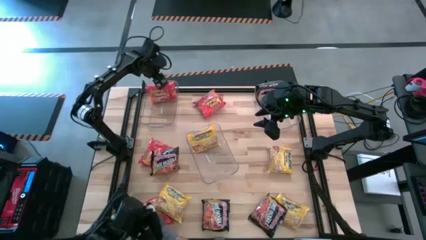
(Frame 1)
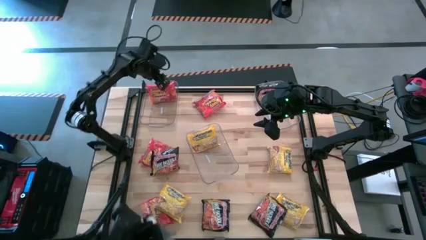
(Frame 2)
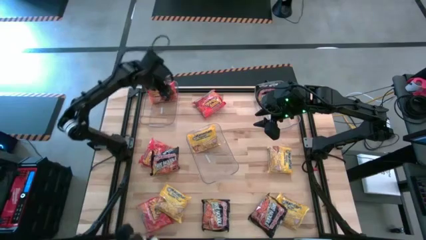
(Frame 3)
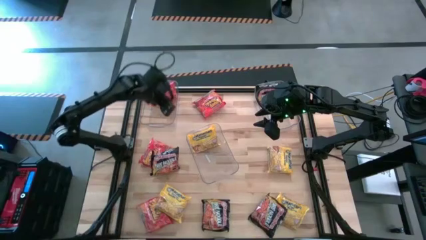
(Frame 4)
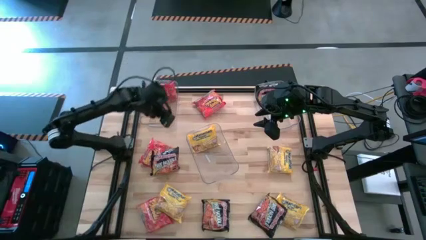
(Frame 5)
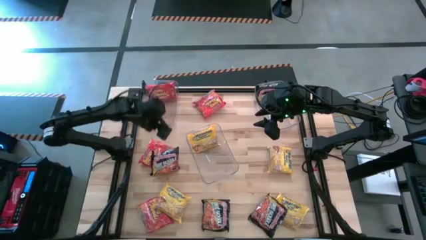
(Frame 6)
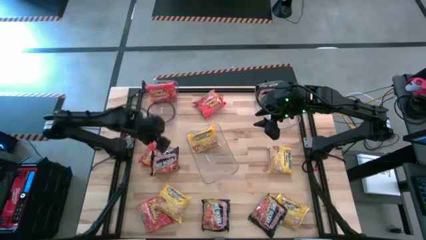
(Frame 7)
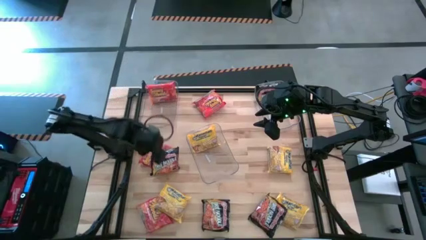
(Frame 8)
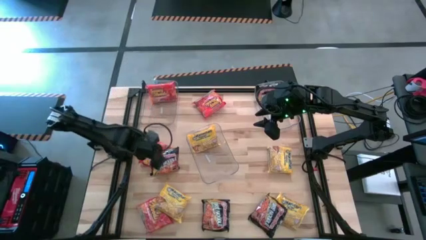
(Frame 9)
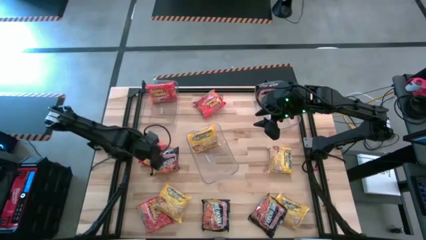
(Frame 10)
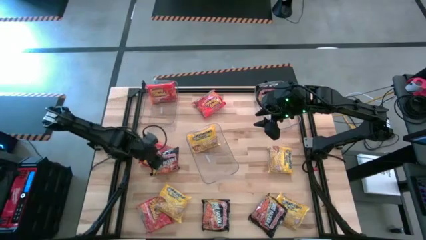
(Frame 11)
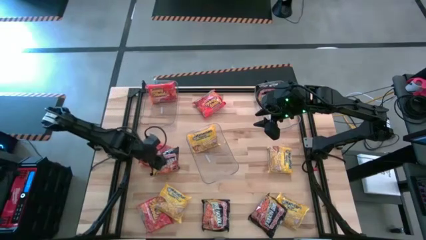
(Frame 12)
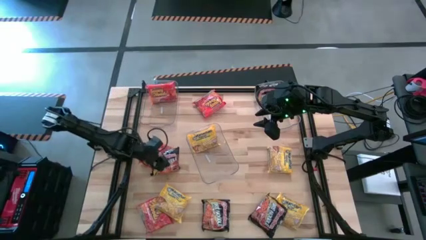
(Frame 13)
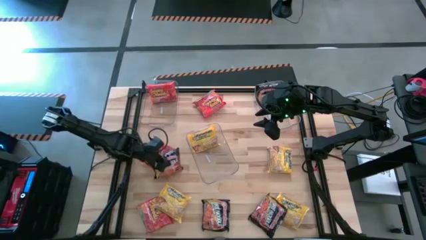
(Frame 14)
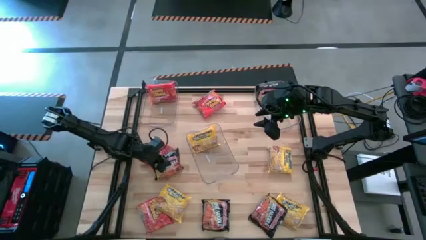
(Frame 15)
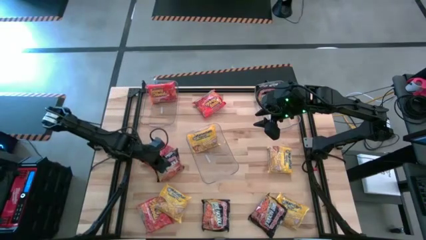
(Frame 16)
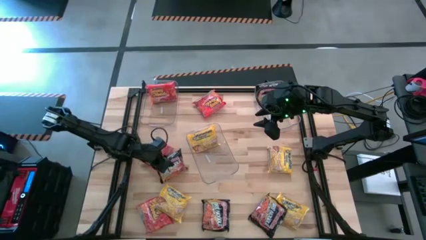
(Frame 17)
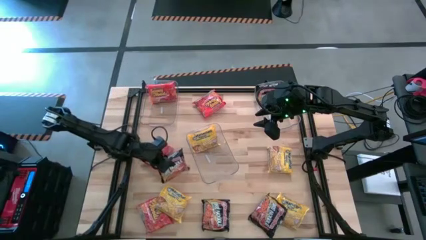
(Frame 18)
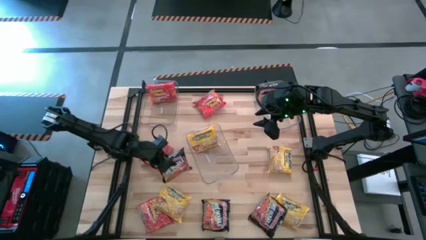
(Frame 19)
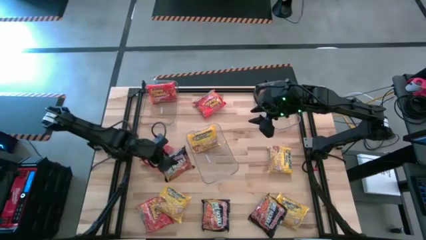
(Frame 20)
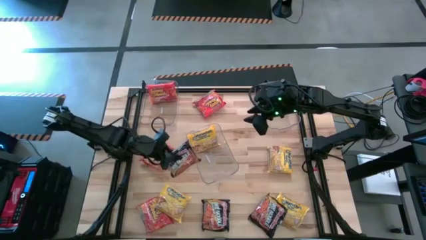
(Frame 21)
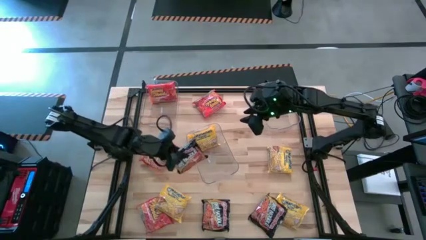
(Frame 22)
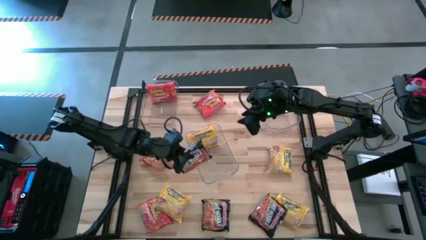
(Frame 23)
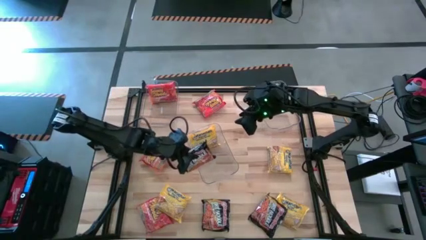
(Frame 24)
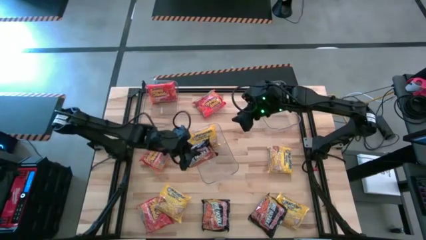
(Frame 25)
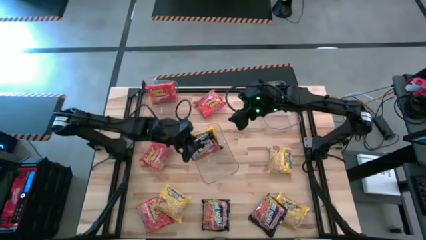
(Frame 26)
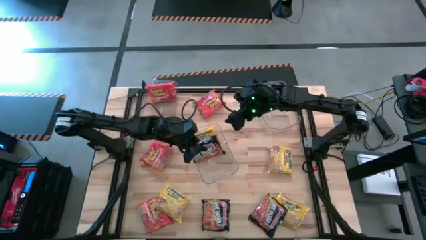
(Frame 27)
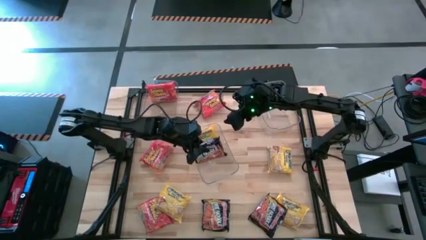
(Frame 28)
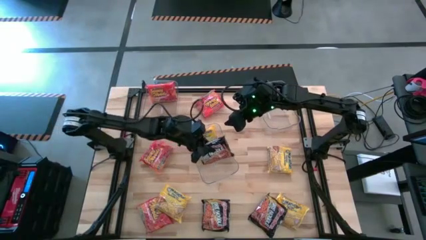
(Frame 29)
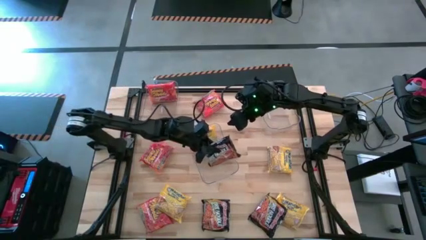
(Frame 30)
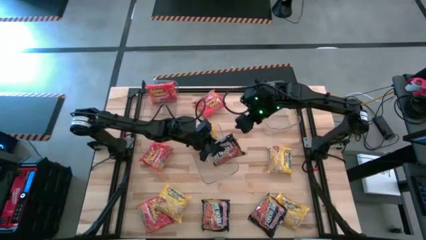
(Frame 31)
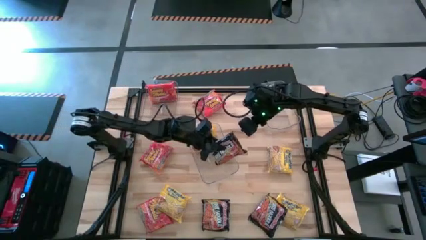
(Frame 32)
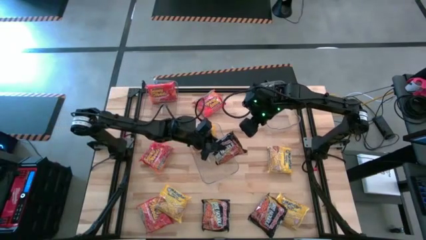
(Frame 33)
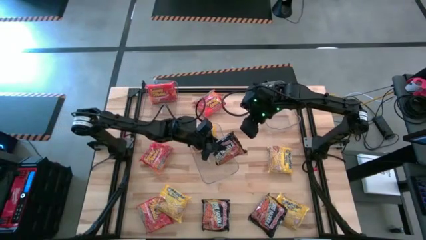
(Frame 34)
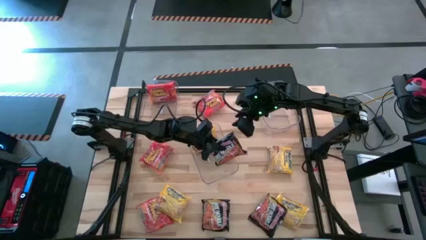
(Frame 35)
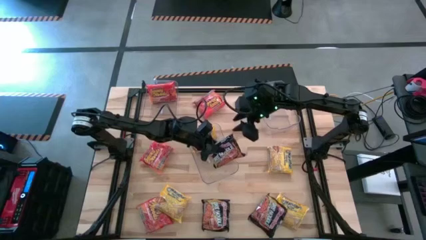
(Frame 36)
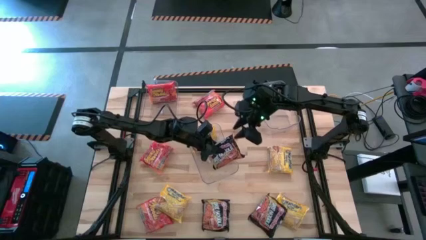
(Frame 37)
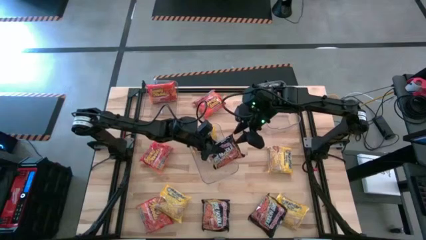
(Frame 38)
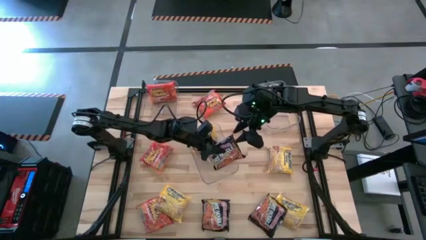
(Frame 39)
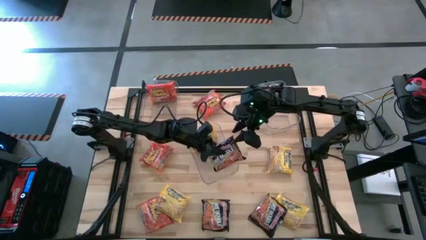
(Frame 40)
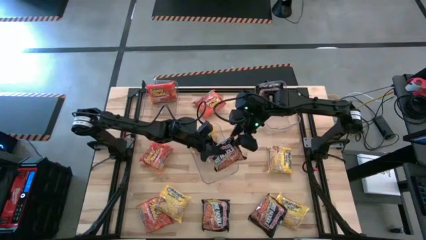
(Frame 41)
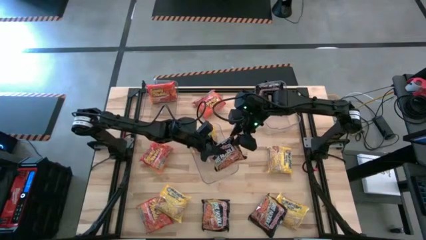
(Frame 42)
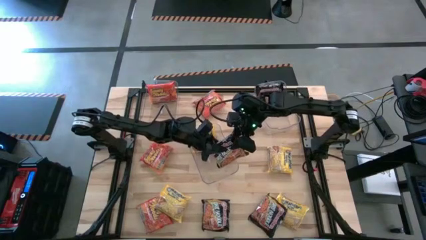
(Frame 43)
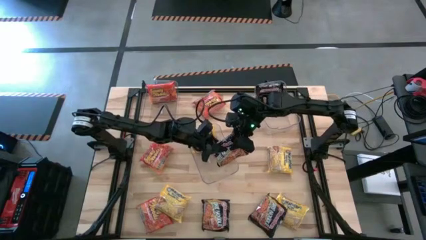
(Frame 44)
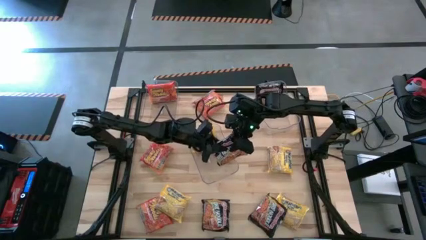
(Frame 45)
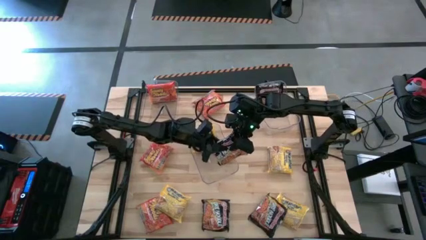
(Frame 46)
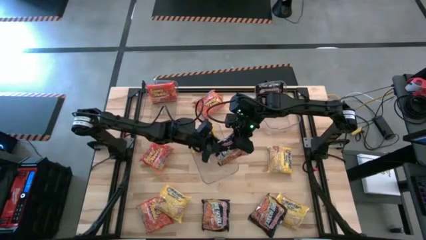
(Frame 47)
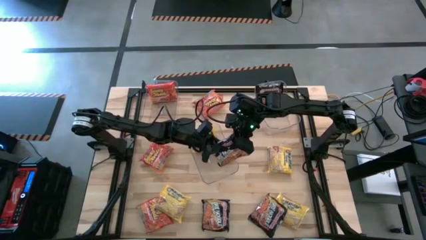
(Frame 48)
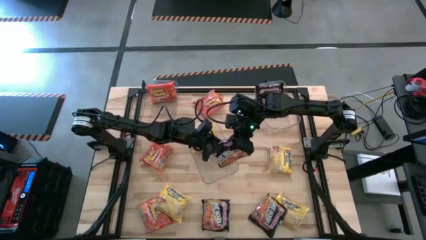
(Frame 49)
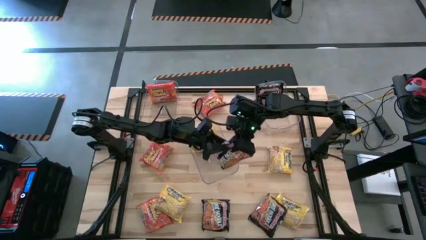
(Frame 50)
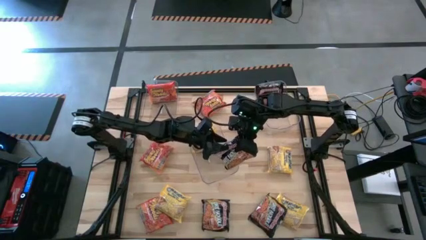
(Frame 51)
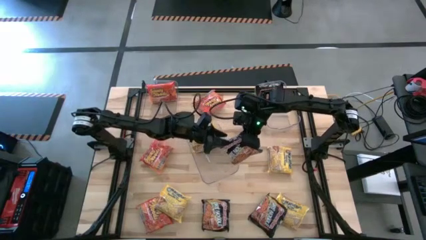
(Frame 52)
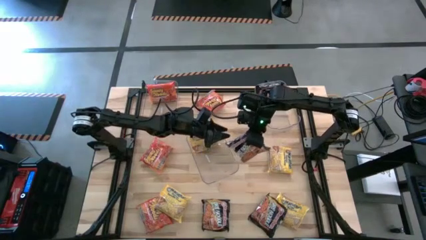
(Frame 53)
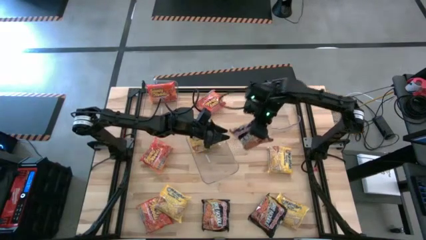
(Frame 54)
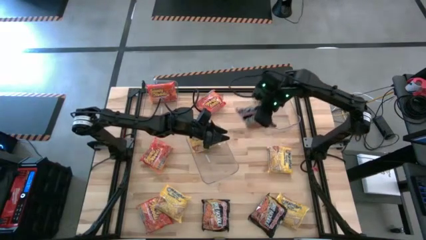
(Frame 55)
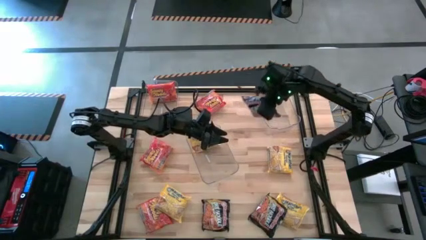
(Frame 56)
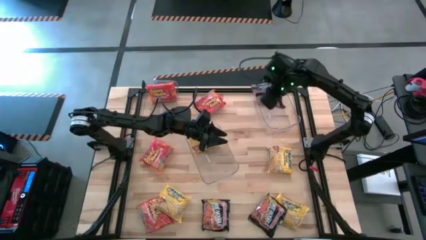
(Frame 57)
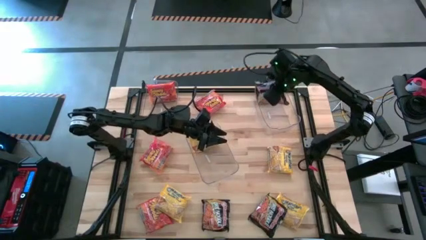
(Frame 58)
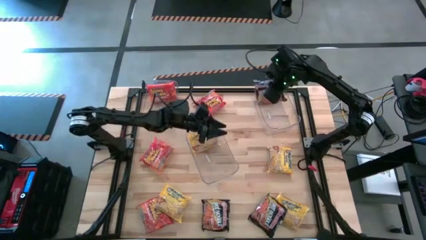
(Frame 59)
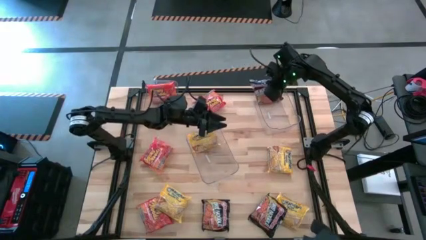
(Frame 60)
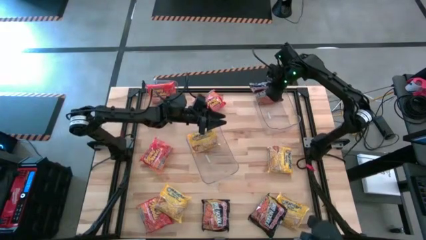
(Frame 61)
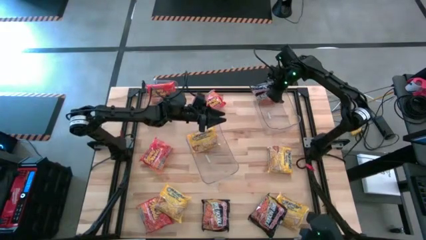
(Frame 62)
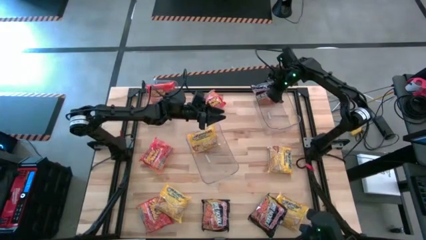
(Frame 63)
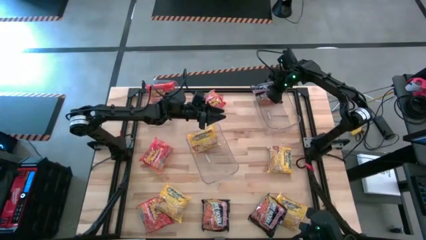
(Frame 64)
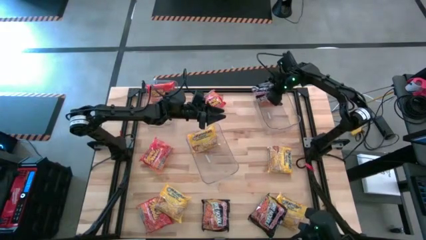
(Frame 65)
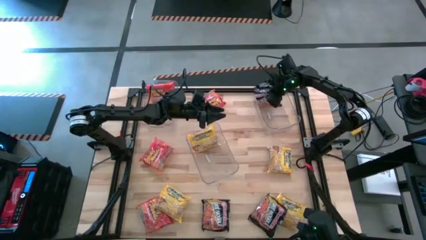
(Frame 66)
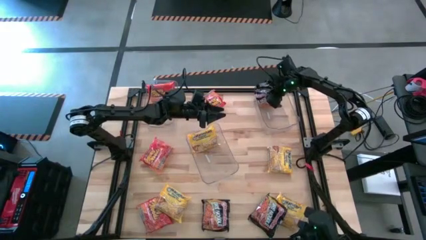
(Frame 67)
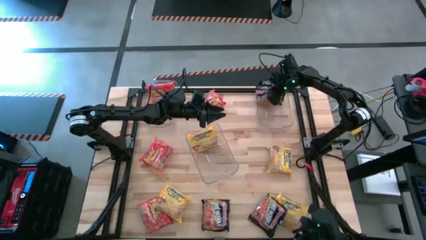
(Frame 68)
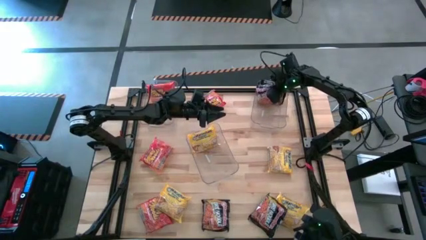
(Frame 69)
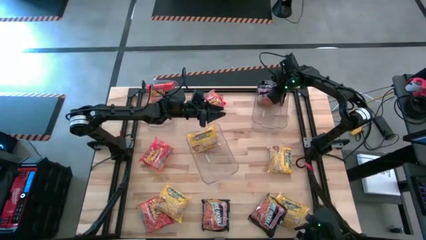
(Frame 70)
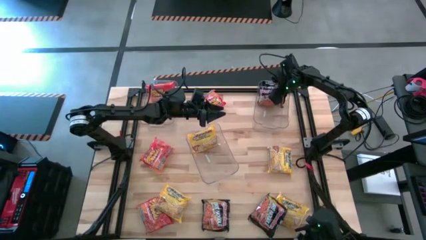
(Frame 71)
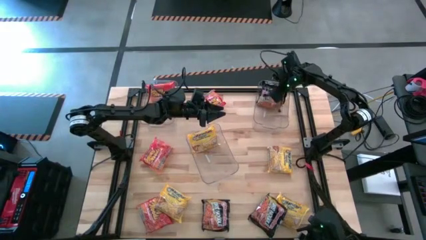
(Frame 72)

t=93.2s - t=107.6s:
Task: Sort Maruchan noodles
Put the top left black noodle pack into the top right transparent bin

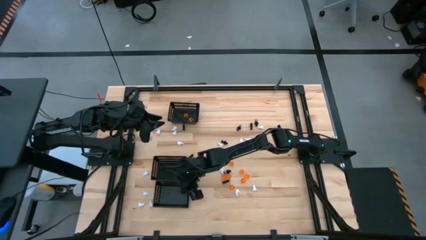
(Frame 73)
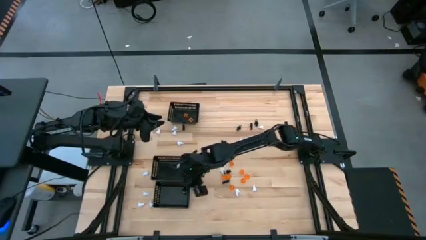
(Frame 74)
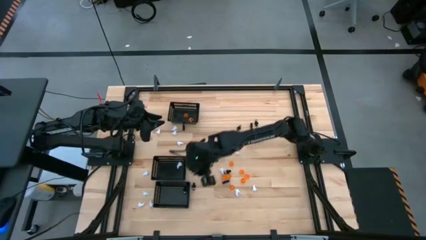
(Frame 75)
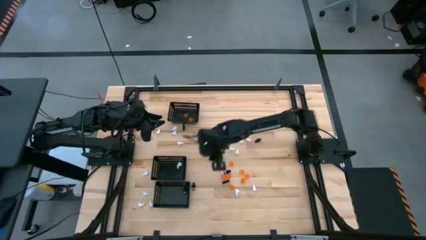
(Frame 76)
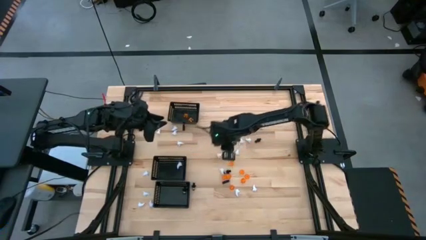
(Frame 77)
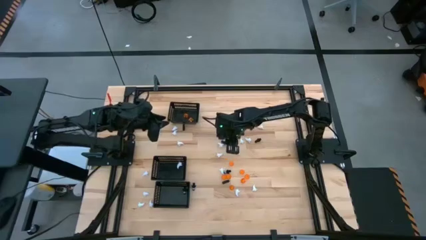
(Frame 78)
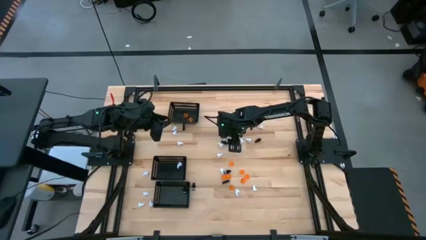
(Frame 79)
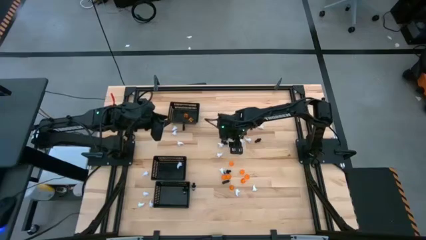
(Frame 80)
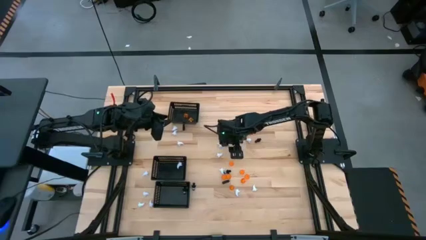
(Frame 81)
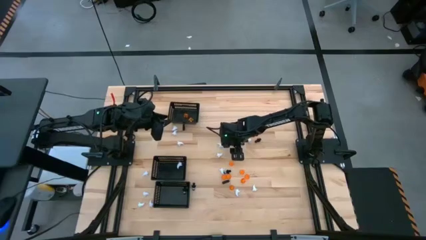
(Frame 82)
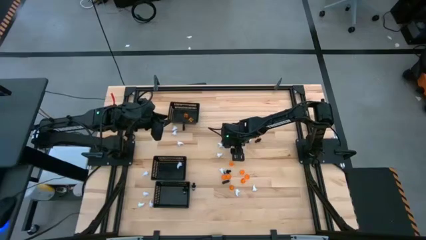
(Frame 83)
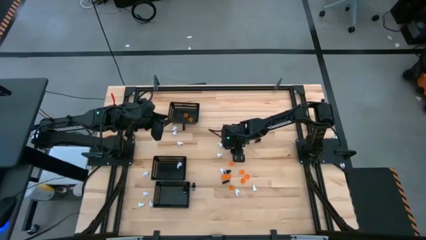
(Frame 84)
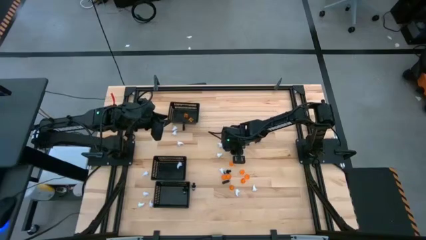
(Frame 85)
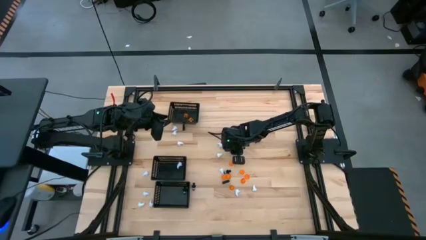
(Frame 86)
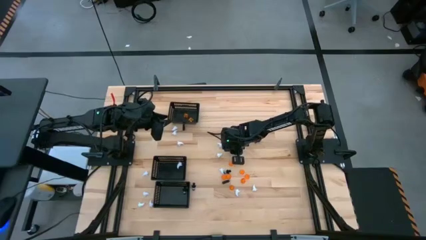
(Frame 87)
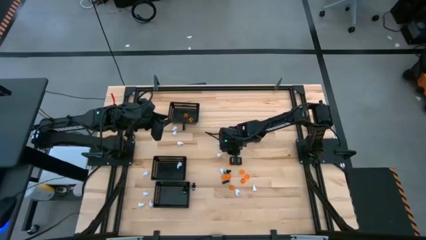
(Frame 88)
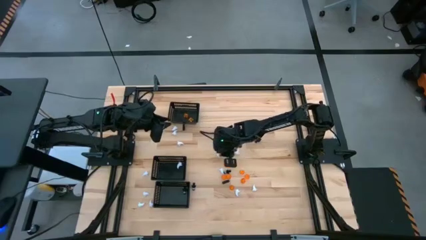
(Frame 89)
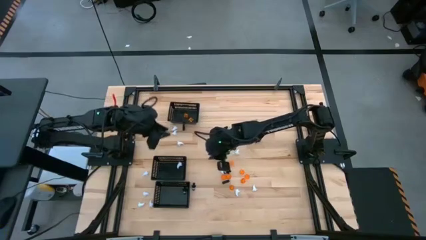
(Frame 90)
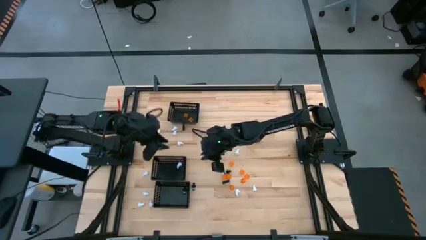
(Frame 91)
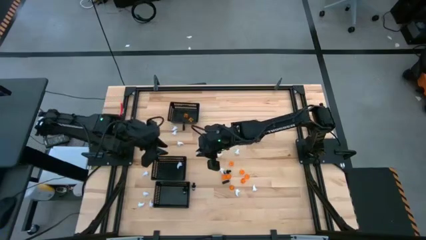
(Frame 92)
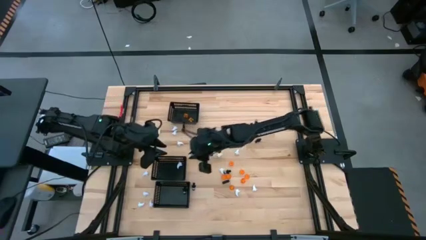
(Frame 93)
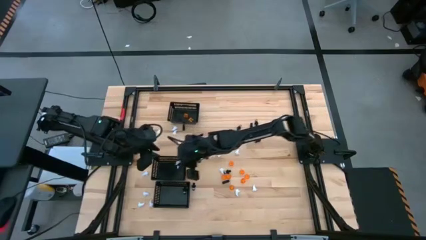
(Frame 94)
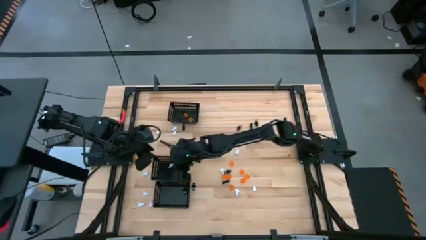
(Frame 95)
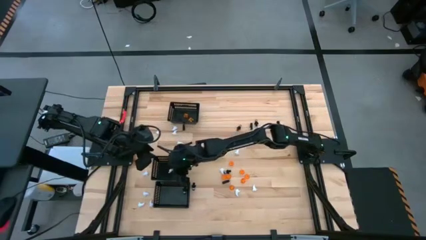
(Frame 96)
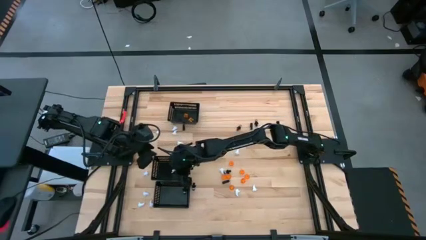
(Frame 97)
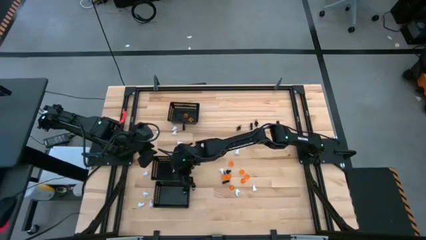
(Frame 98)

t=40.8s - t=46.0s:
Task: Sort Halloween decoration
Put the white toy into the middle black bin
